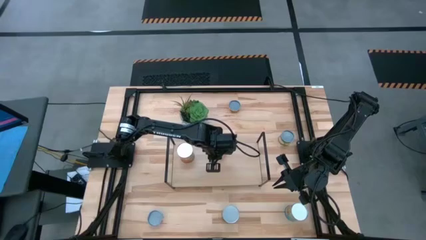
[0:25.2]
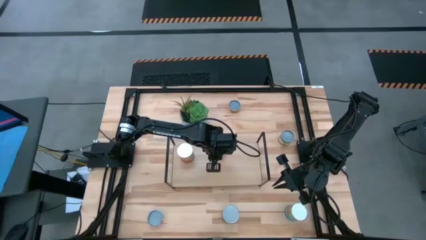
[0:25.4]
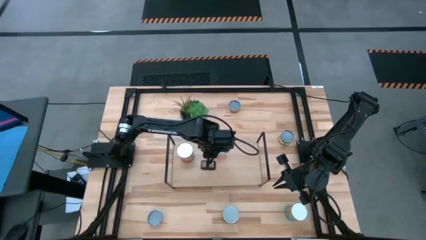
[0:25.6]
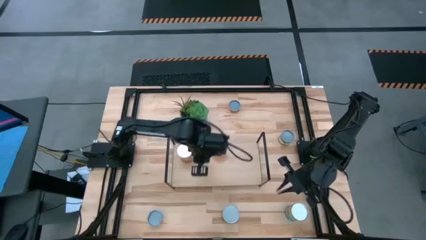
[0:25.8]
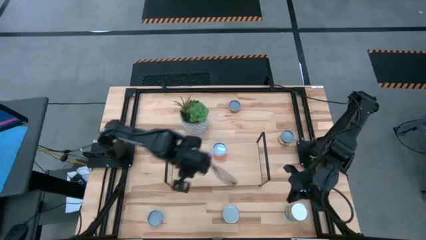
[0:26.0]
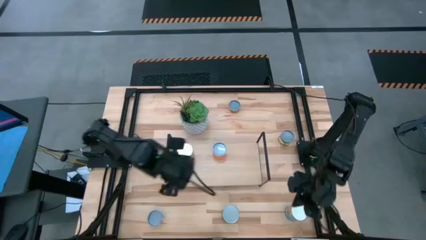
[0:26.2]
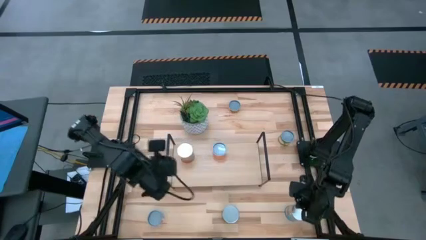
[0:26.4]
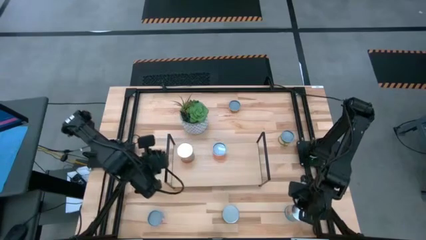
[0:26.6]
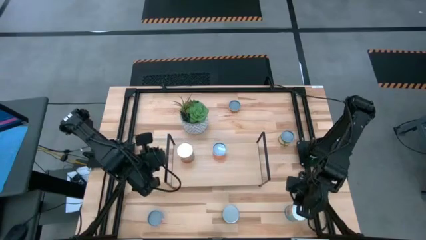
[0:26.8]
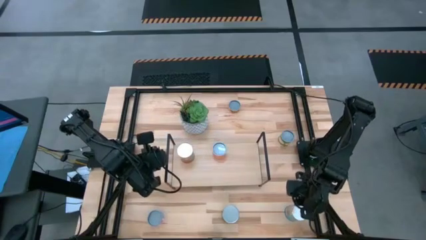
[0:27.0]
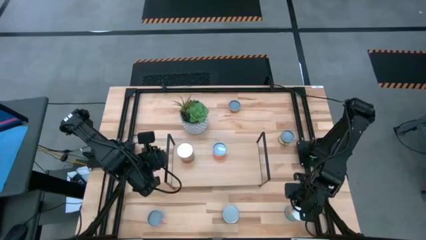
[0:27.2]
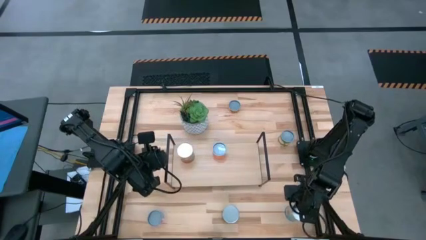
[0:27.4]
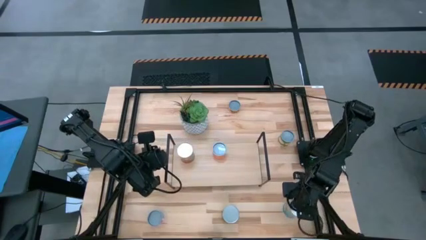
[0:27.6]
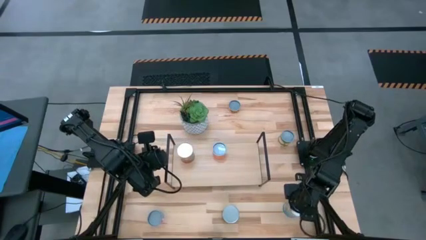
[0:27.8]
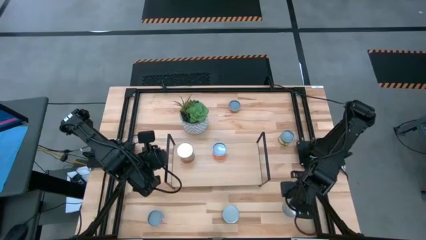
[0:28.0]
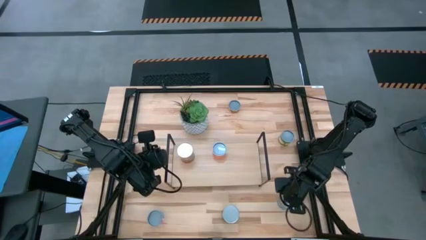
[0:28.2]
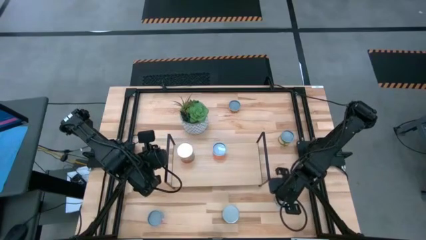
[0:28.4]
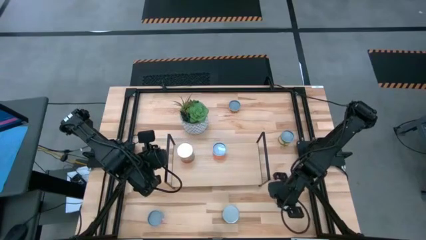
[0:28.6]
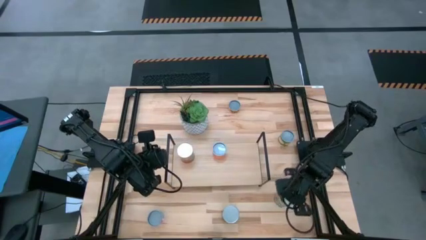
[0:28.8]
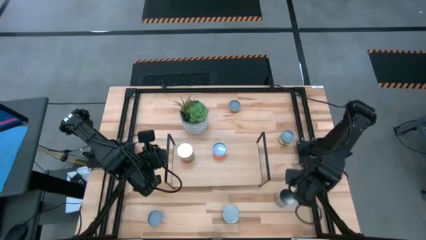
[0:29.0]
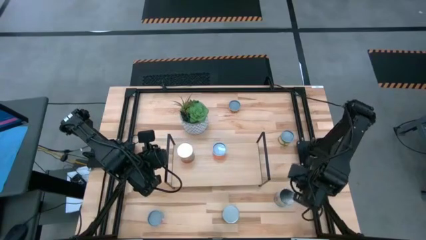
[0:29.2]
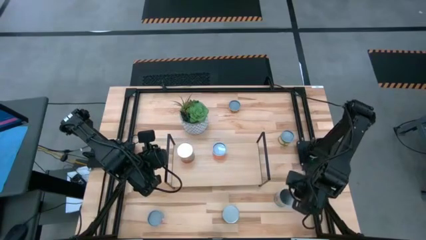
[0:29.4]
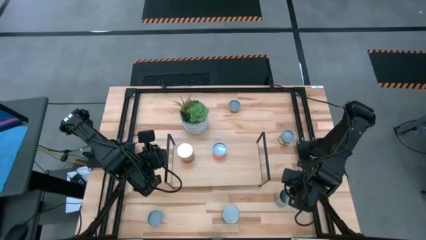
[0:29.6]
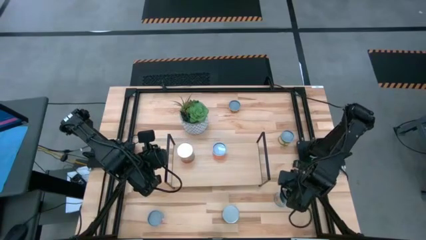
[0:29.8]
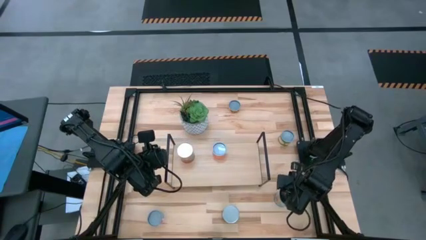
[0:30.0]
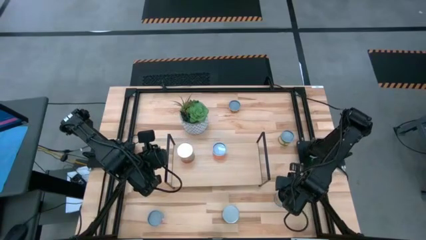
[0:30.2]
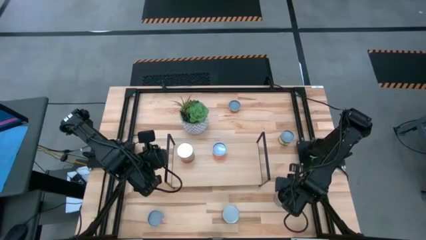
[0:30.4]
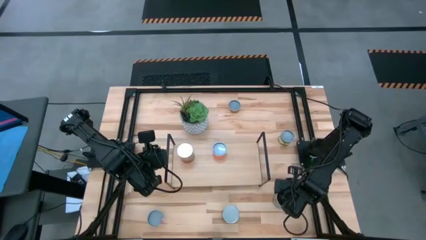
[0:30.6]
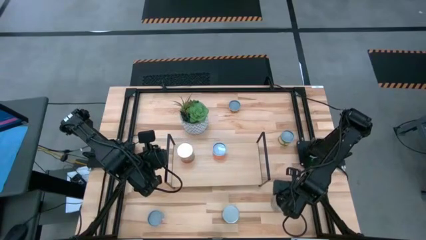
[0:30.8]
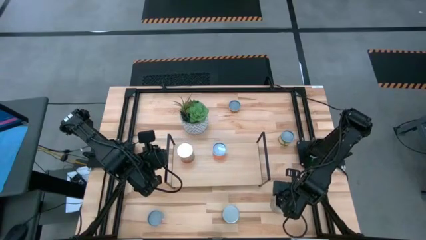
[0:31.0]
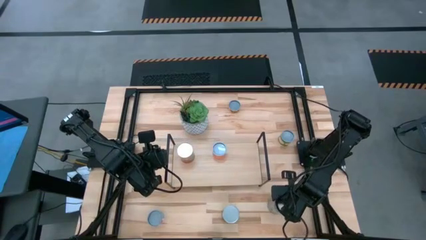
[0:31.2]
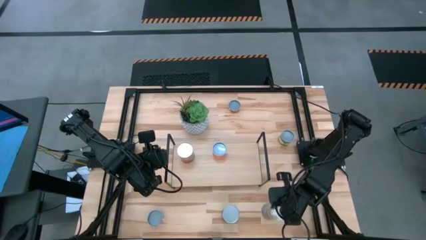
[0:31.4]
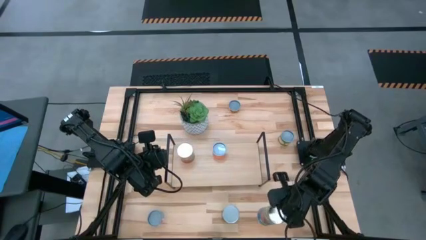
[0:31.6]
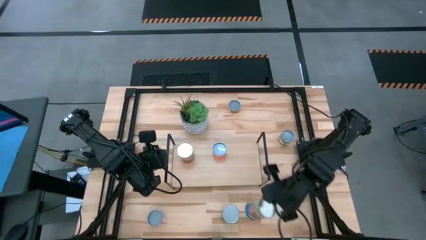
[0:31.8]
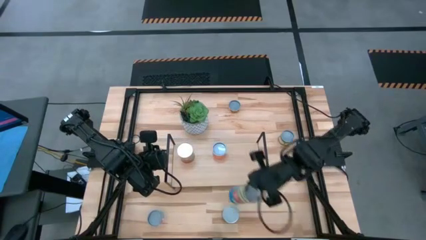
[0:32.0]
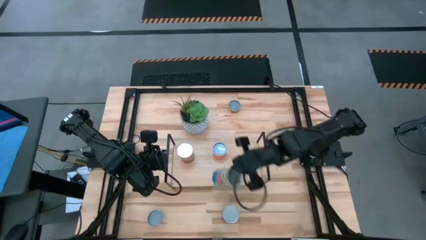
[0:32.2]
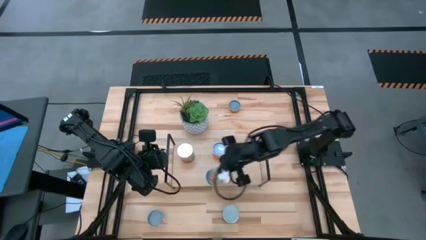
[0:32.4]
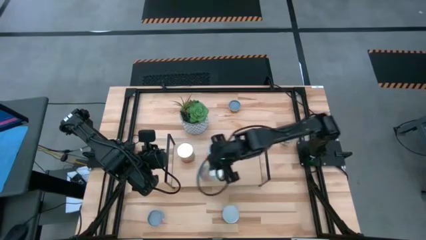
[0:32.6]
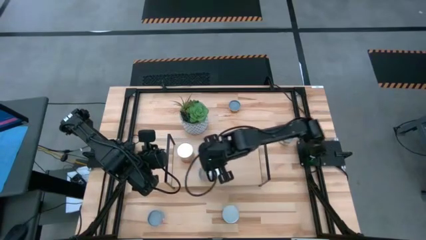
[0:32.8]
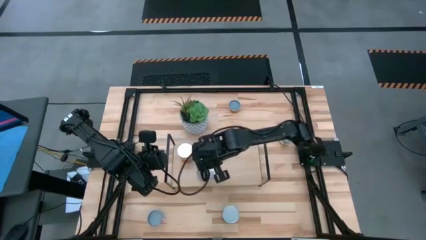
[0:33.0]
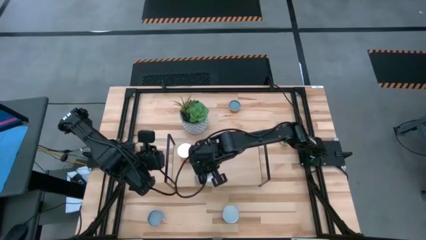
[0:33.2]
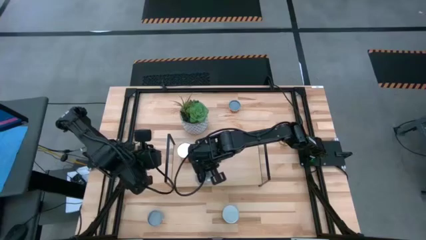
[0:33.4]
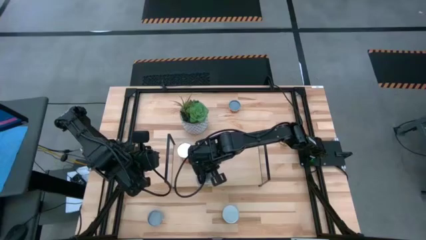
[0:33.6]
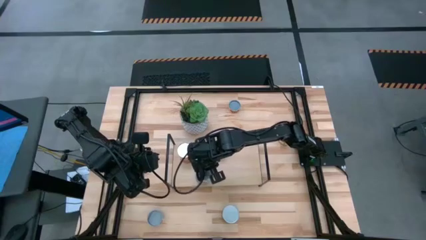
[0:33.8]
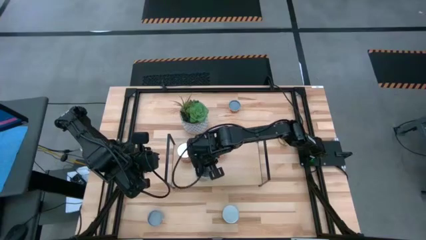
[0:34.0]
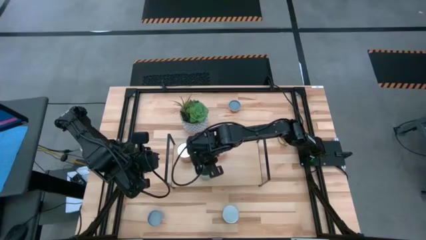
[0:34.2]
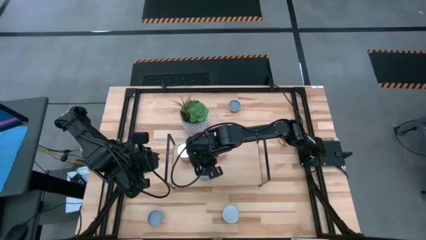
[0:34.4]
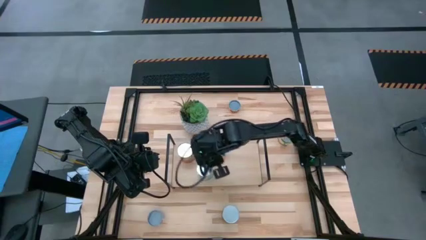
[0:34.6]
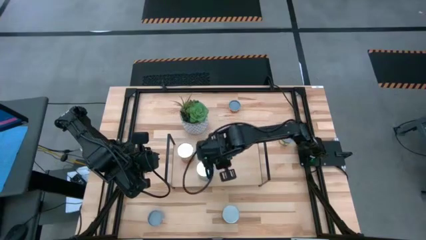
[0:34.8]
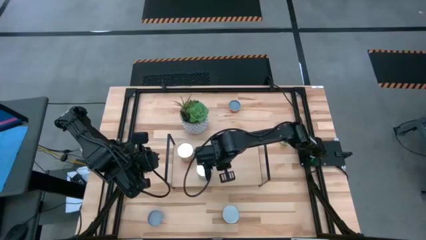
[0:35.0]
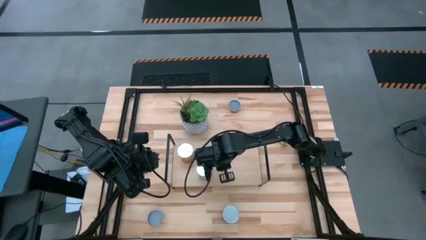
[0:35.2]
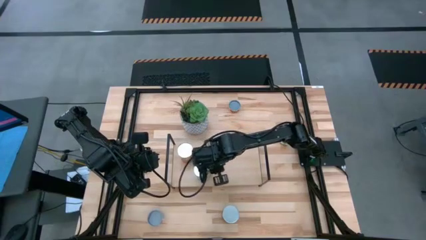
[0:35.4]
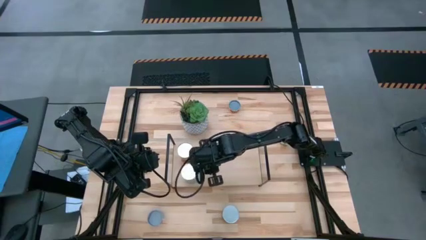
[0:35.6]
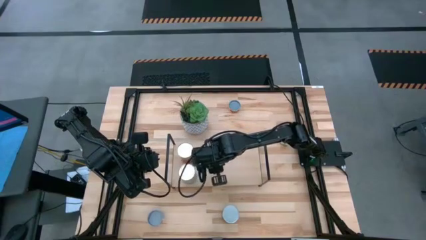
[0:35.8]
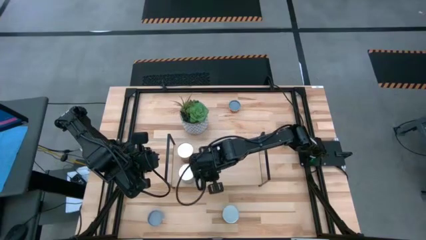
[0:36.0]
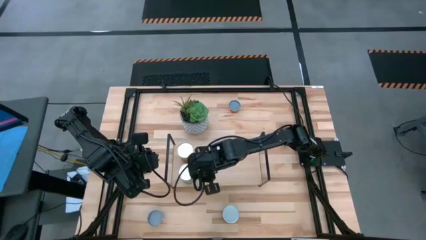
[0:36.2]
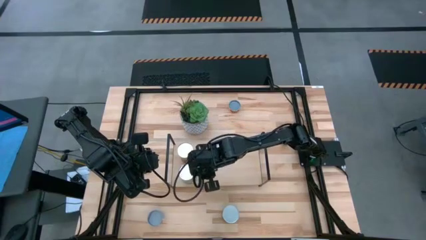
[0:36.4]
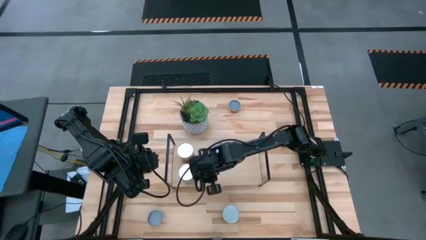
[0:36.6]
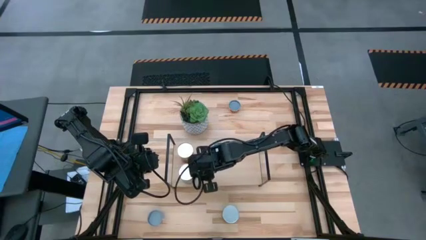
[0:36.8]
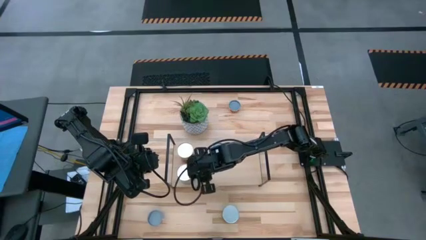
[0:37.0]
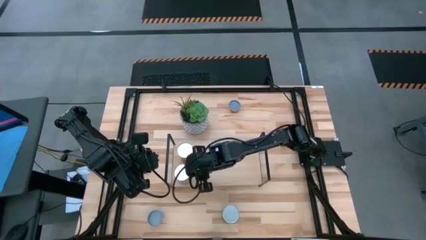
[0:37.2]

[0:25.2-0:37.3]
Task: Pick and place cans onto a shelf
Put the canned tomatoes on the shelf
